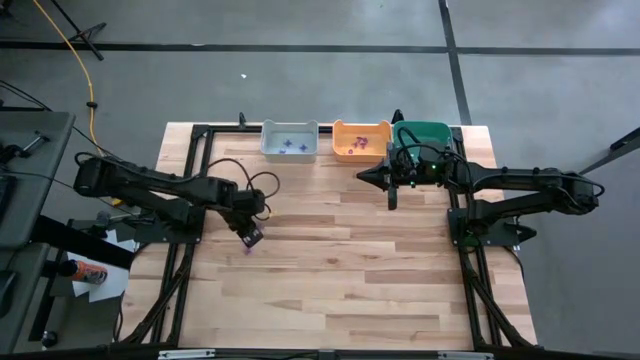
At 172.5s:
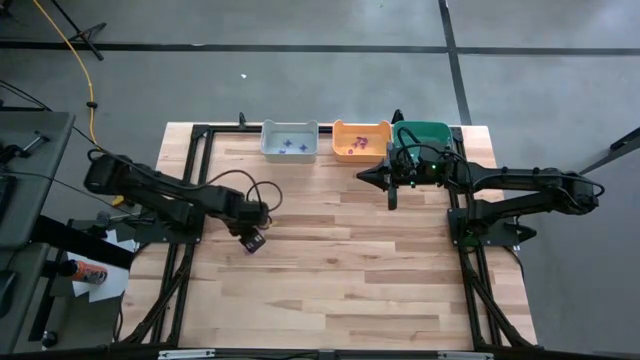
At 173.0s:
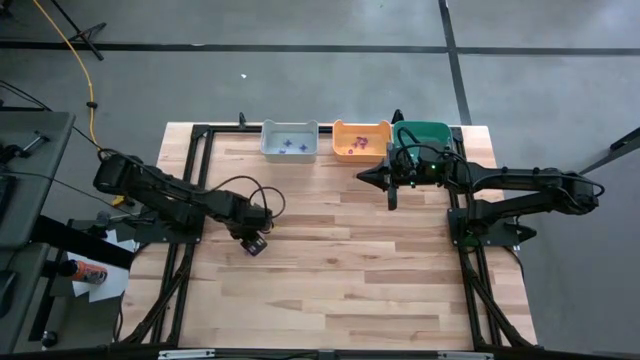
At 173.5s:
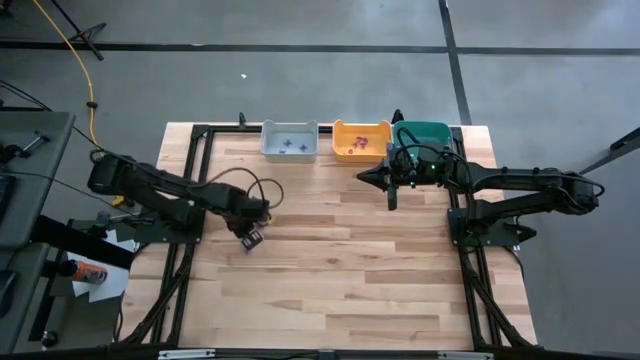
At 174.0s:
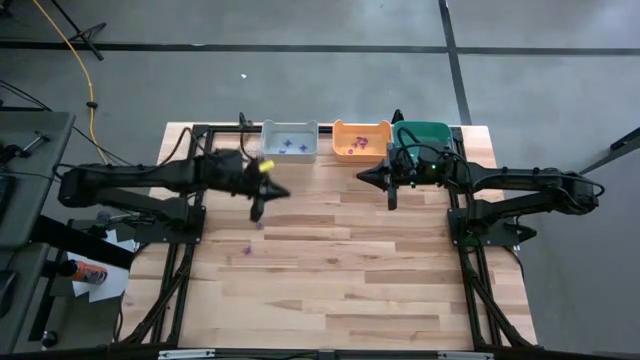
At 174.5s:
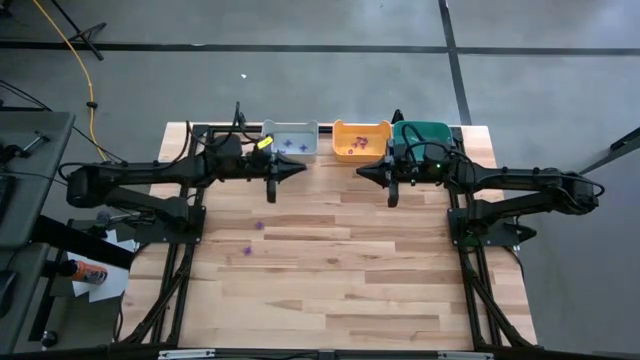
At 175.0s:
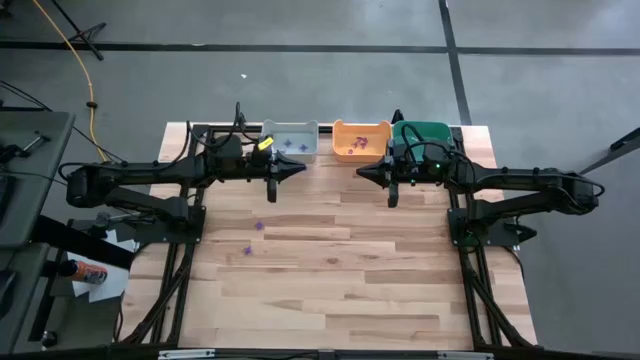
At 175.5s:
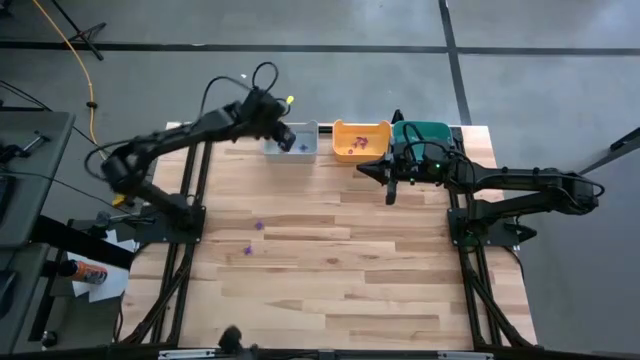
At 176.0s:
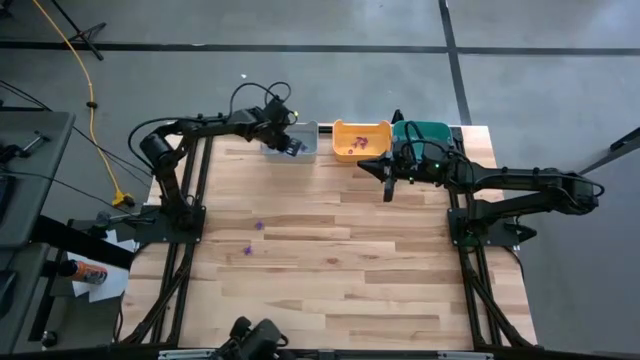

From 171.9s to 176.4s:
Task: Sort Halloween decoration
Put the purple spider toy into the gray bin

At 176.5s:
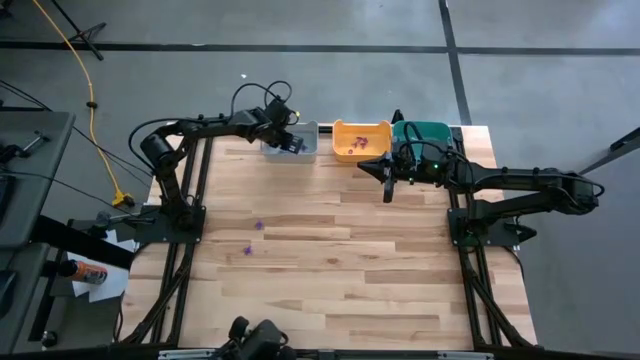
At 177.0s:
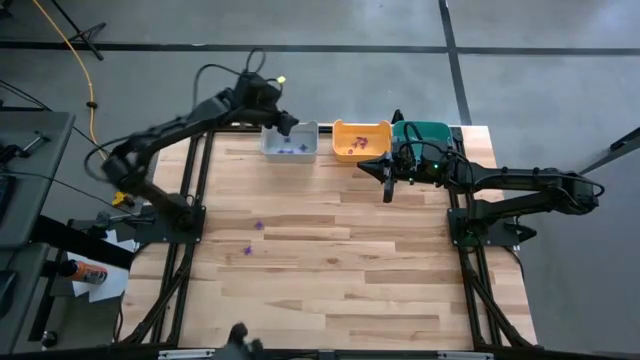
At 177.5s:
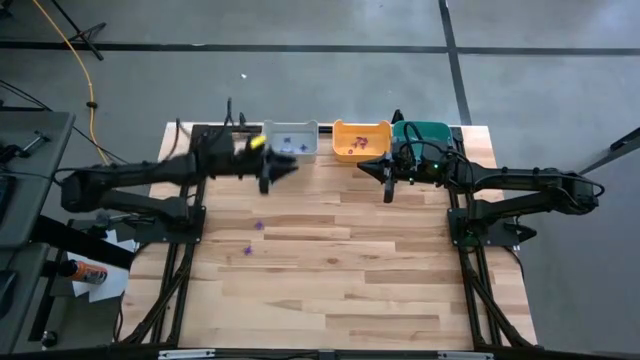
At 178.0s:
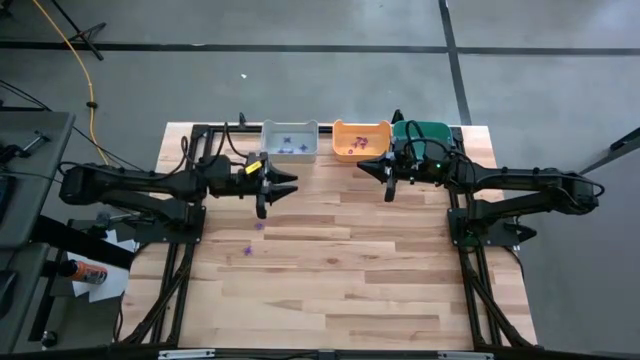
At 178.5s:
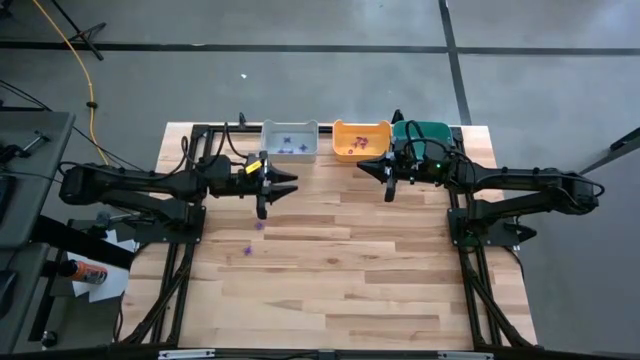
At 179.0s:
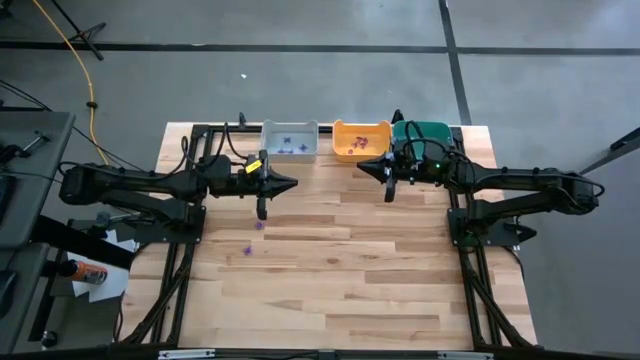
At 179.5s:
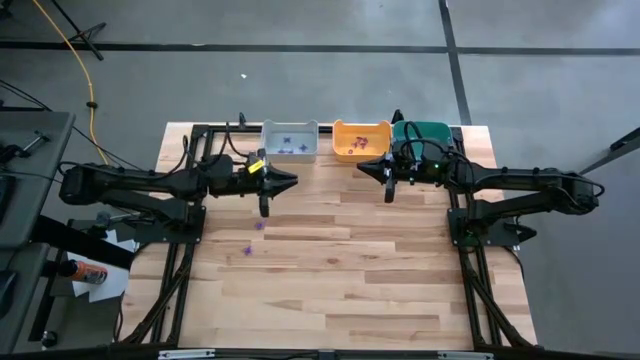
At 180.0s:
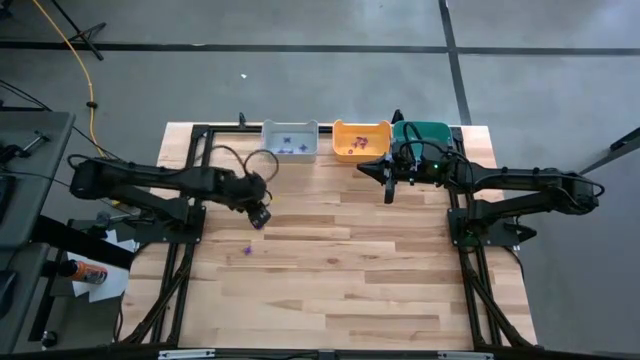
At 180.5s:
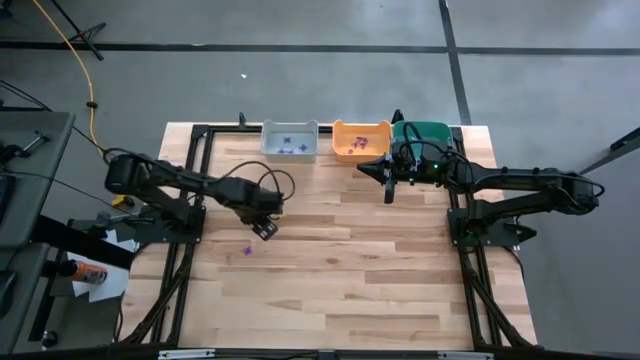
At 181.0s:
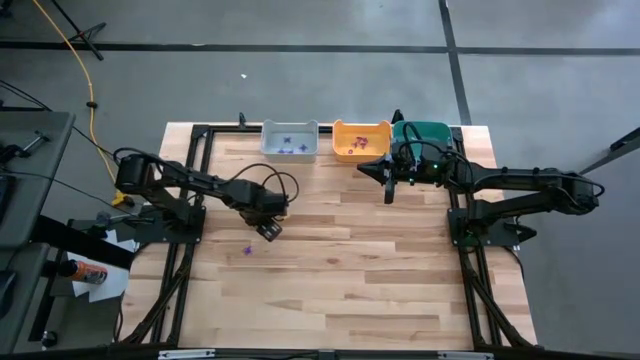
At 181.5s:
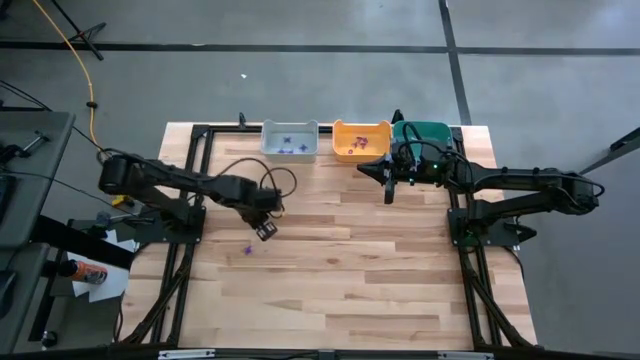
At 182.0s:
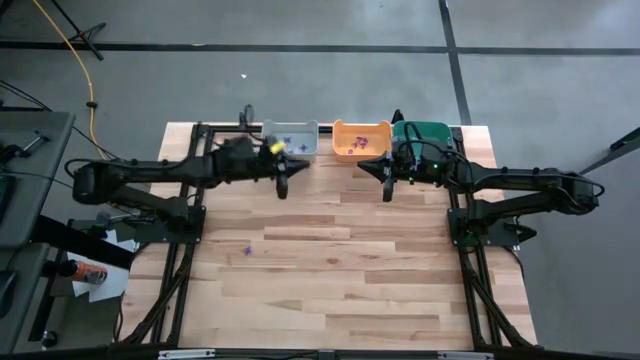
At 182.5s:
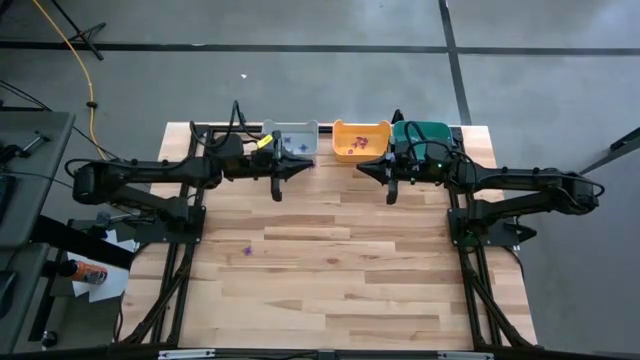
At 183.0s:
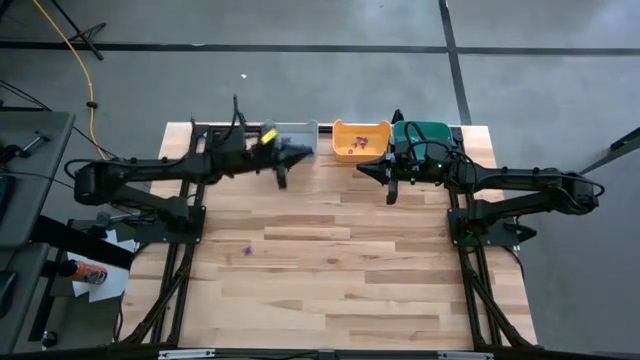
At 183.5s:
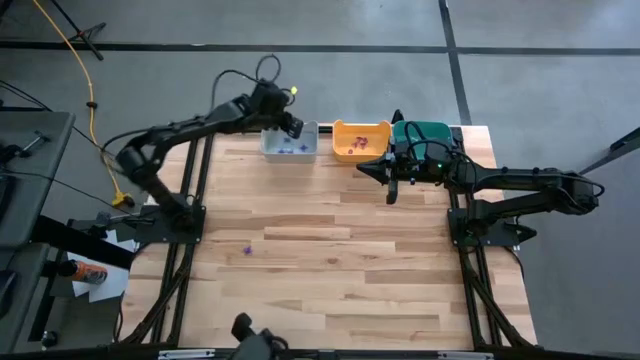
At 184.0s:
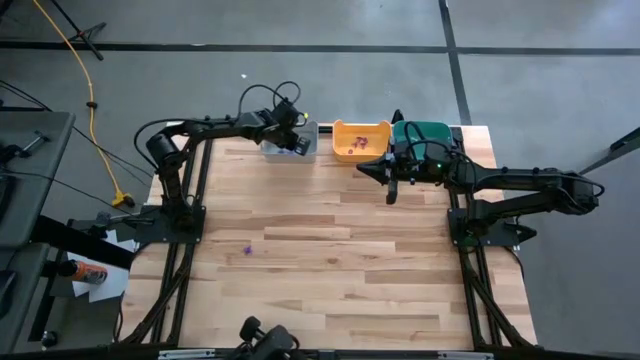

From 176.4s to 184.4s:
Put the purple spider toy into the gray bin

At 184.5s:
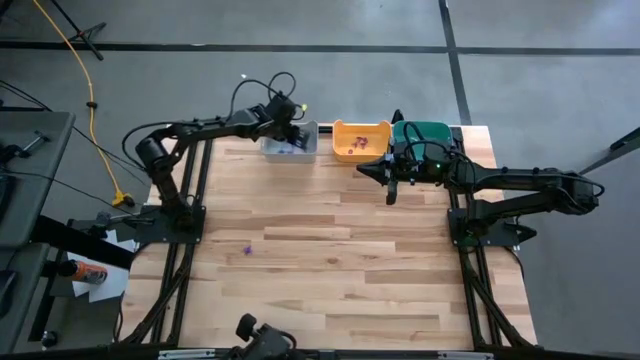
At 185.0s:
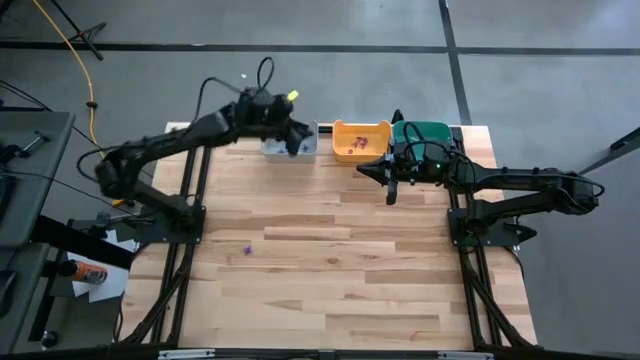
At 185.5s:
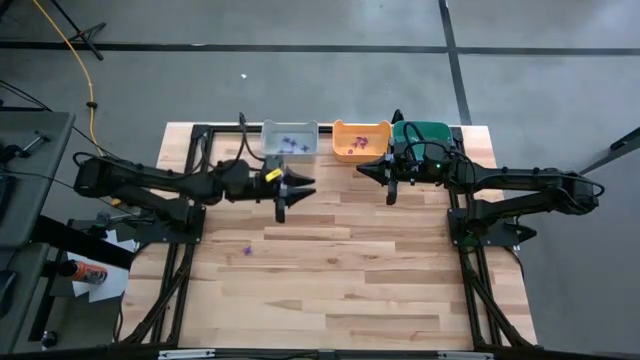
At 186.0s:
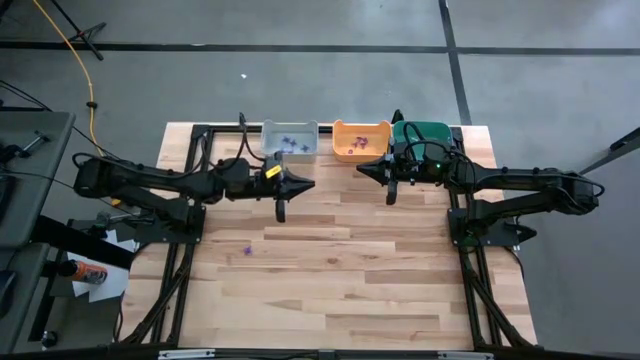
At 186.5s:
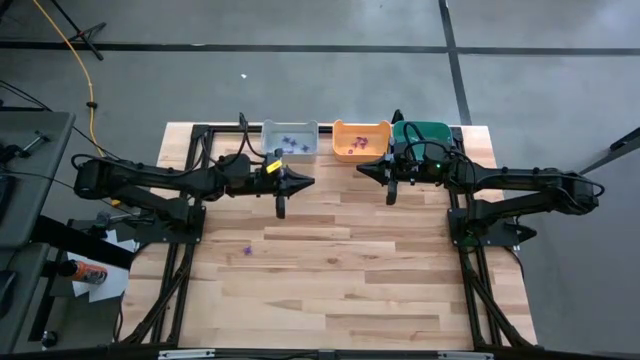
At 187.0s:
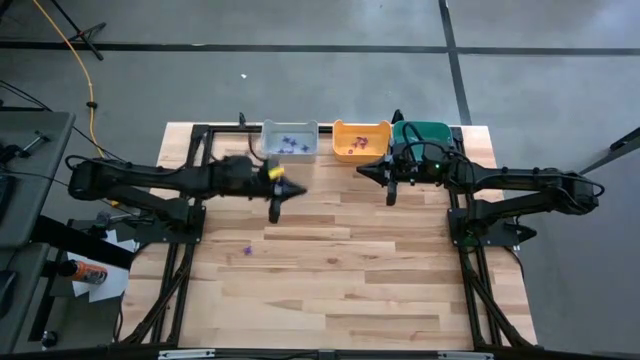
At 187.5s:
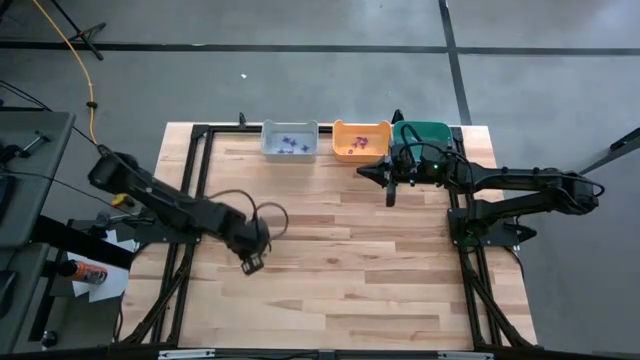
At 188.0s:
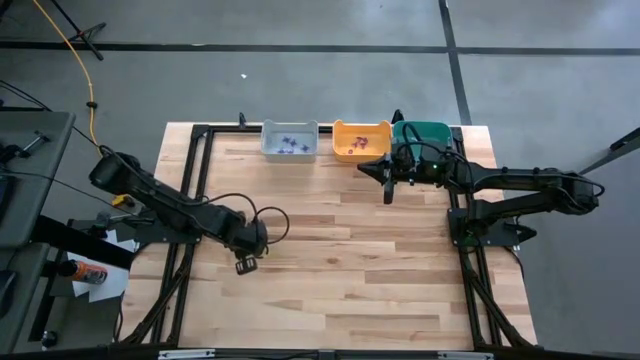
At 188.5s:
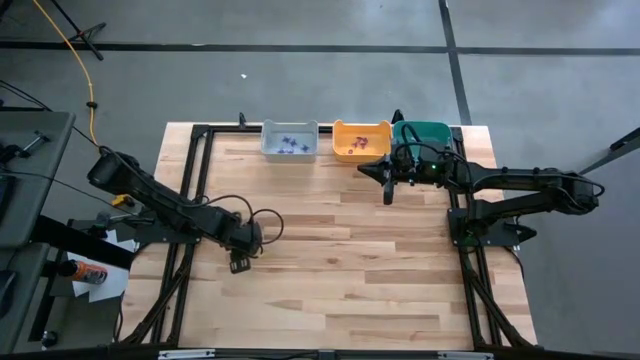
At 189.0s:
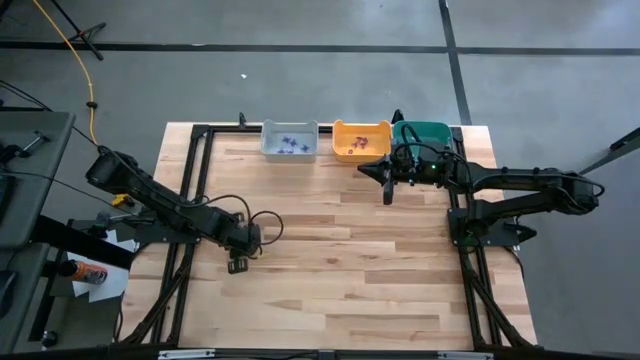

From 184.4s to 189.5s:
Put the purple spider toy into the gray bin

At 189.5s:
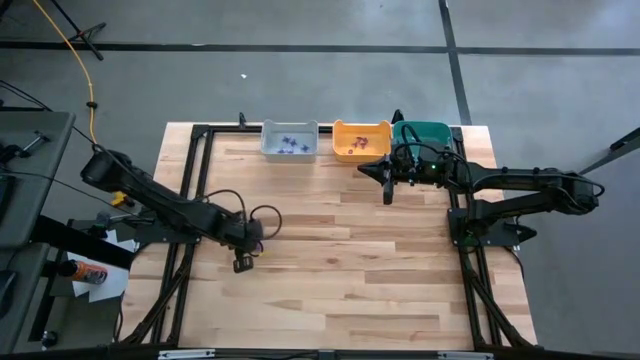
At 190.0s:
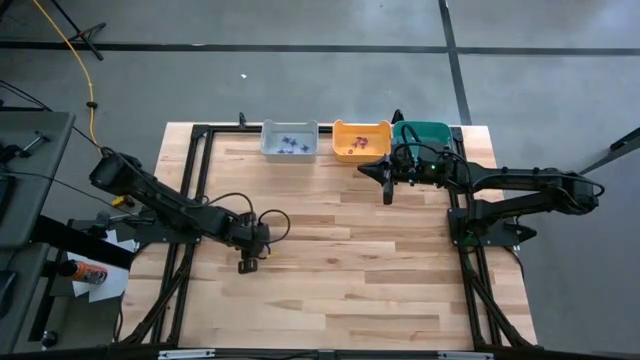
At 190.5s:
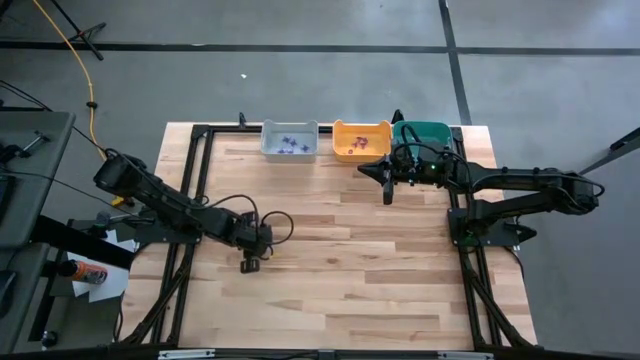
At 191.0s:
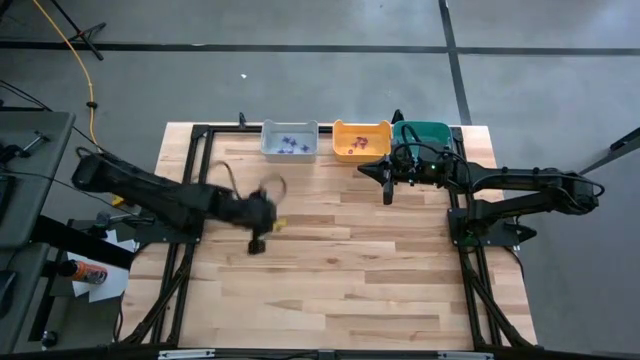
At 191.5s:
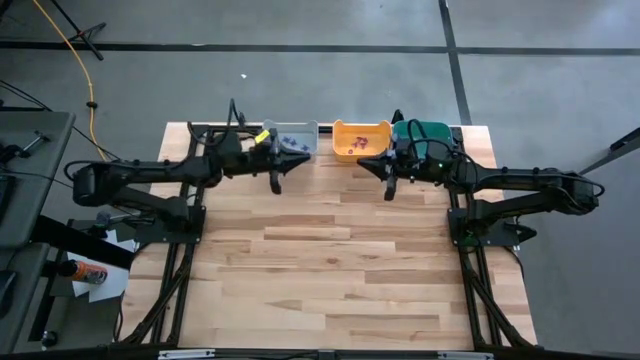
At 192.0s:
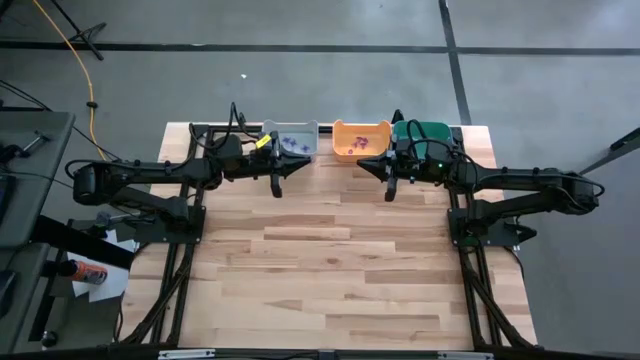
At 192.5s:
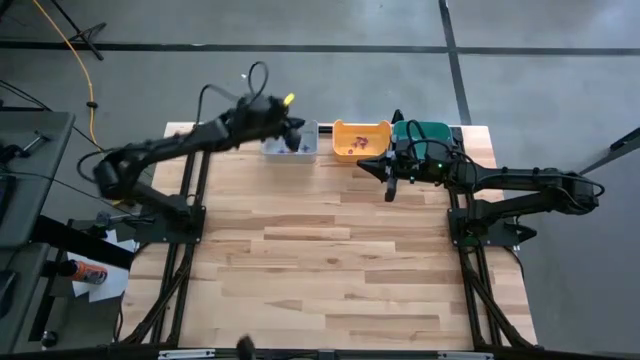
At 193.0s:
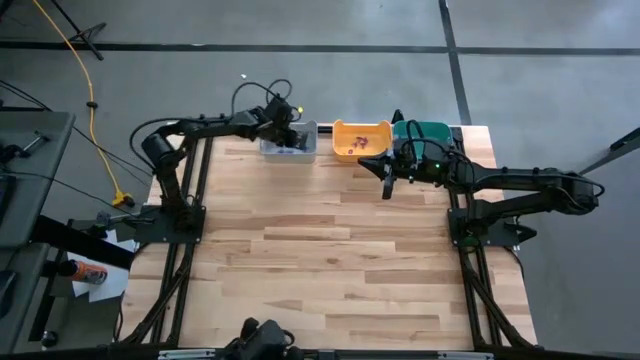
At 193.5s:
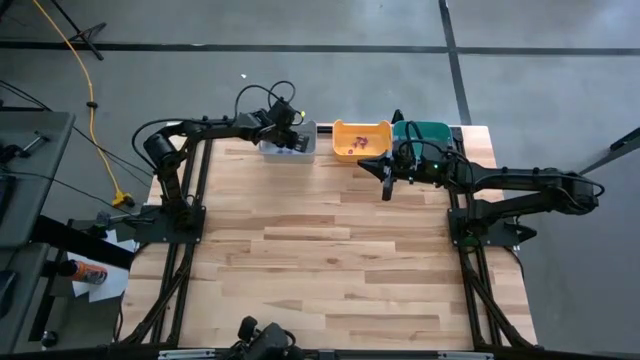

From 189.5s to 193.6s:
Put the purple spider toy into the gray bin
